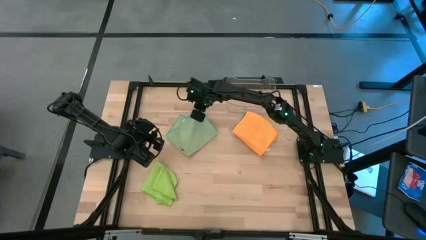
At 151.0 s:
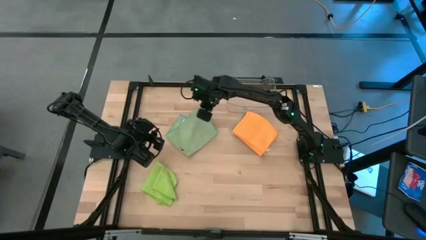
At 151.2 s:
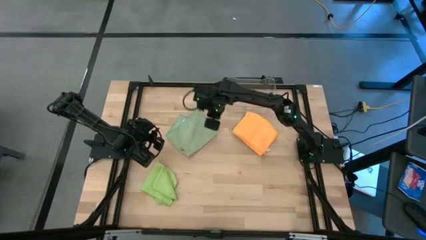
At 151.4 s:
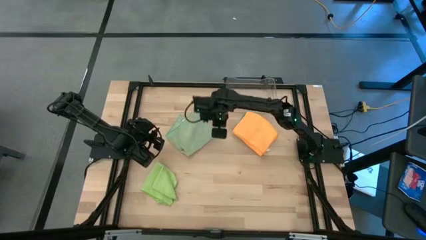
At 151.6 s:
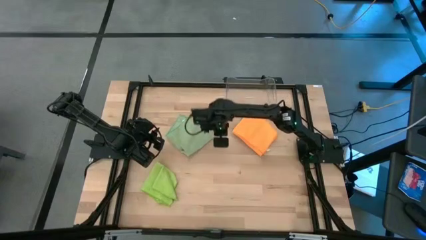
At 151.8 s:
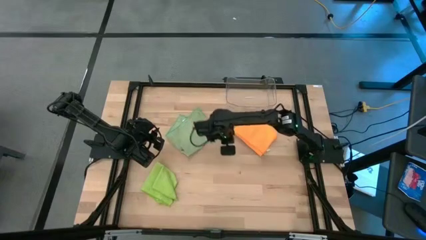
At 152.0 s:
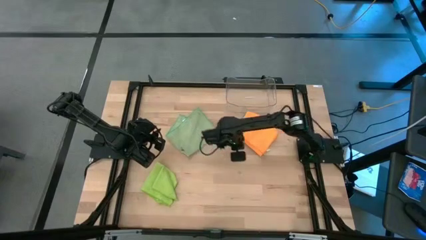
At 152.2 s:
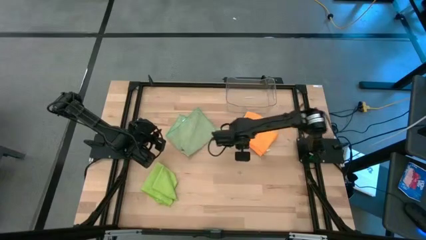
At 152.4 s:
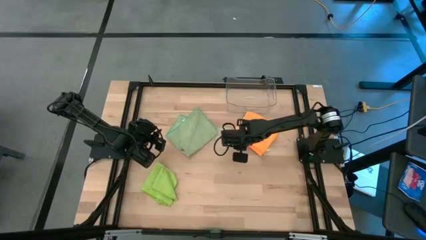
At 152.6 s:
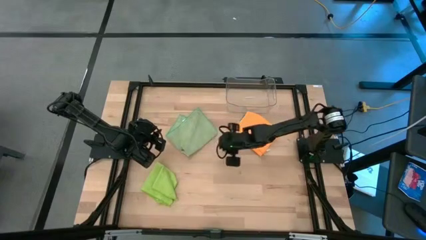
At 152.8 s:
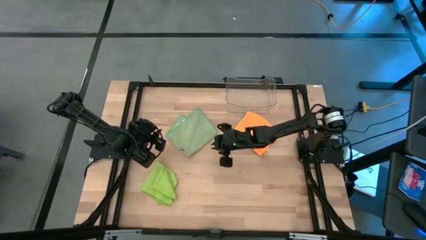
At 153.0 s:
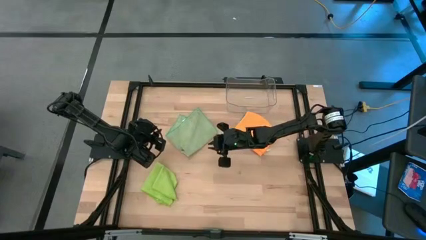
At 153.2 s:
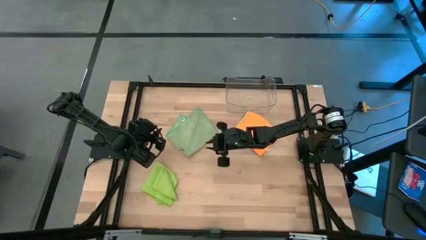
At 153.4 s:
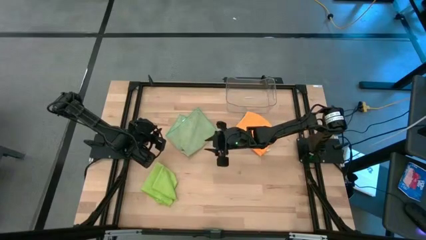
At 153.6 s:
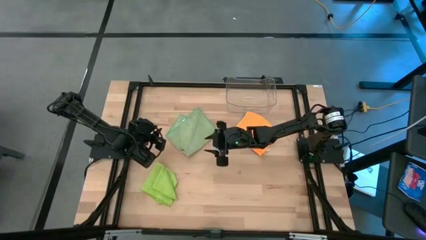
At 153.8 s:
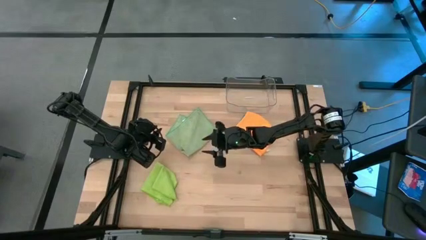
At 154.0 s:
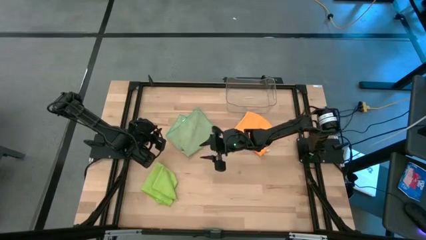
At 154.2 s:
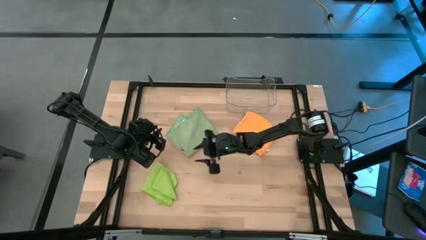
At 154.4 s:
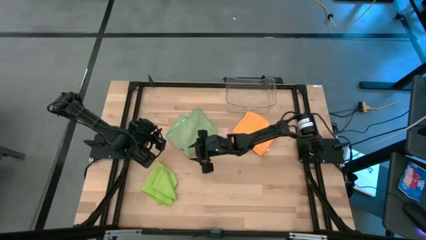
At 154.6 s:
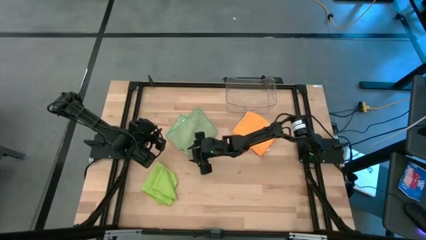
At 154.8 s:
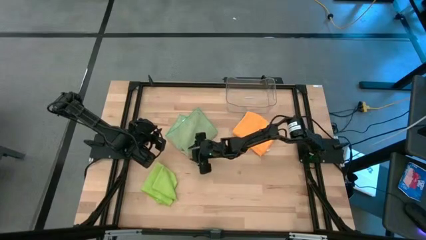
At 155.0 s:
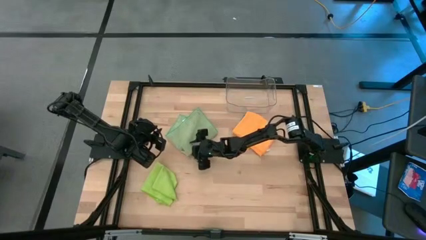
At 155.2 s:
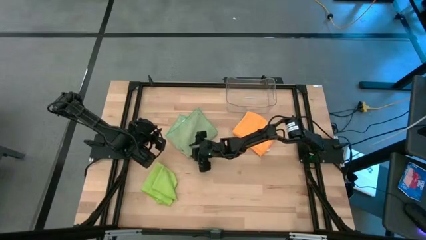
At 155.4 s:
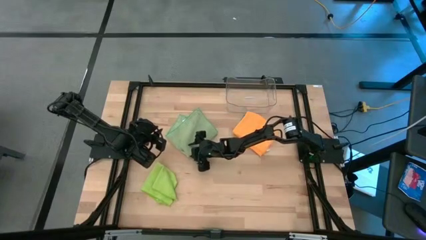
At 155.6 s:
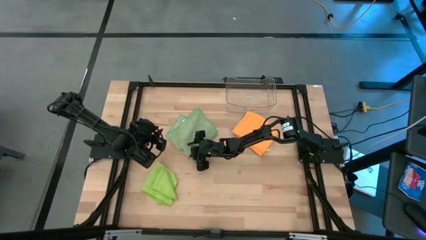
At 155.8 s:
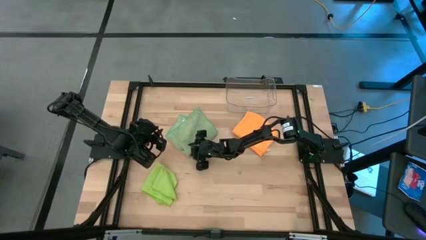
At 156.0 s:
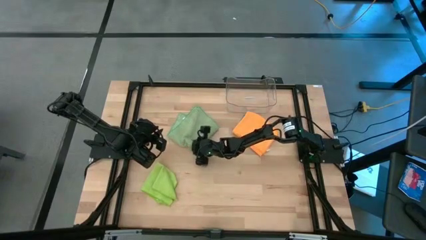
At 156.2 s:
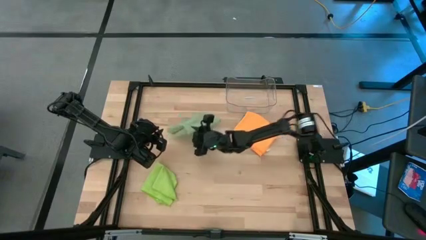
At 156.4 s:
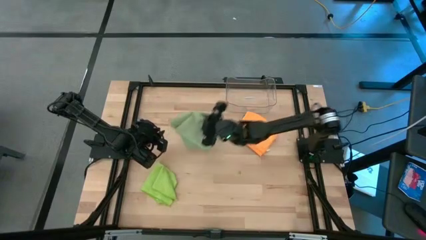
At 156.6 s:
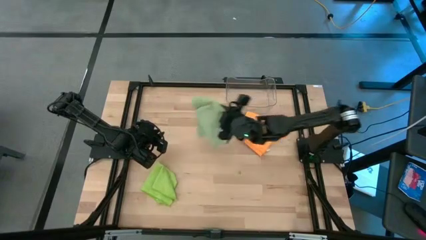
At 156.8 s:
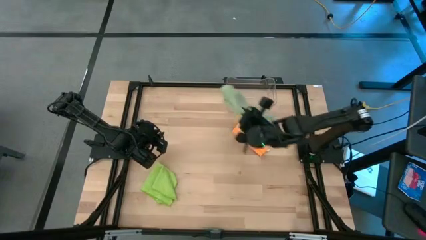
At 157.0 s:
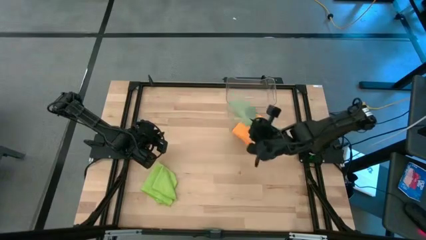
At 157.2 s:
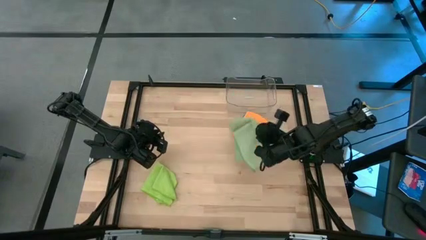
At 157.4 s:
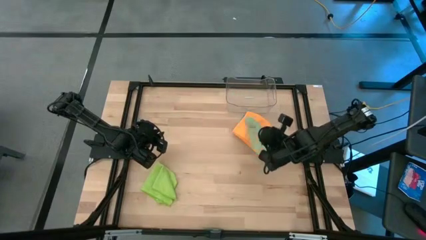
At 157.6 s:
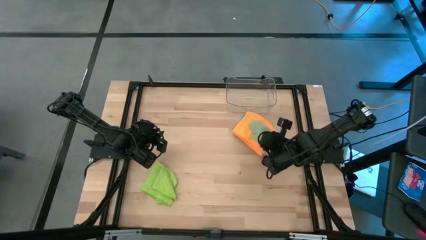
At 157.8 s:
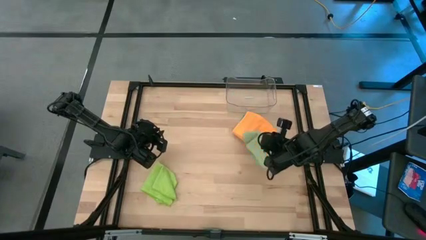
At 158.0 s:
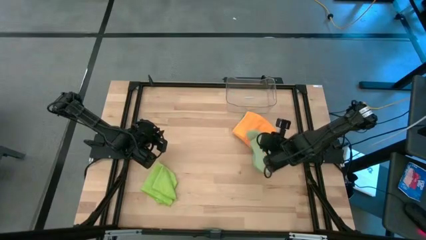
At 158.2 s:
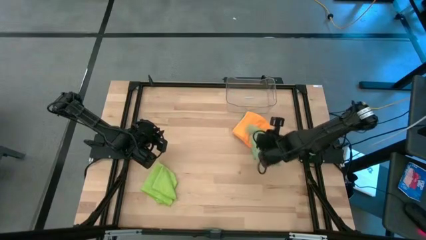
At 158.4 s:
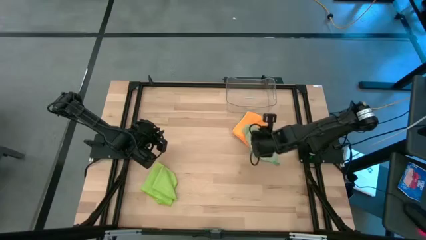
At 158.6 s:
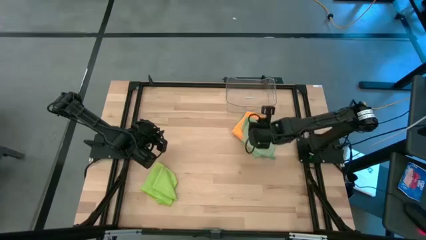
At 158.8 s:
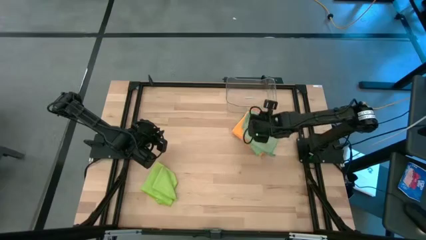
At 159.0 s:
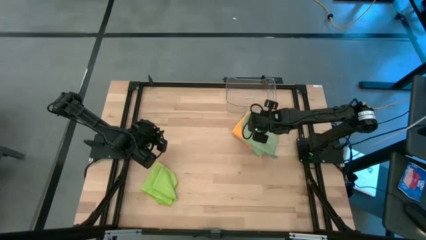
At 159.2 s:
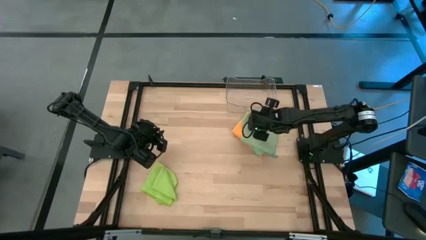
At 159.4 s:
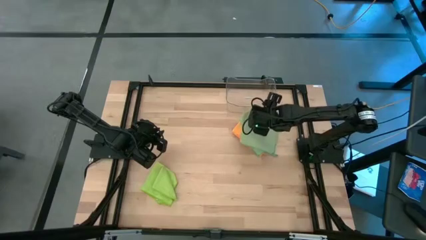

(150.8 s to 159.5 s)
Task: Fold microfiber towels
Stack the folded green microfiber cloth on top of the folded orange microfiber cloth

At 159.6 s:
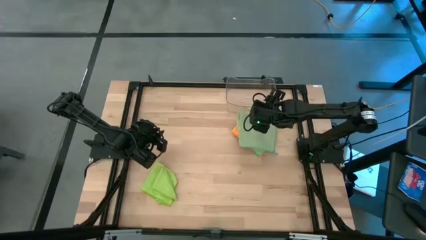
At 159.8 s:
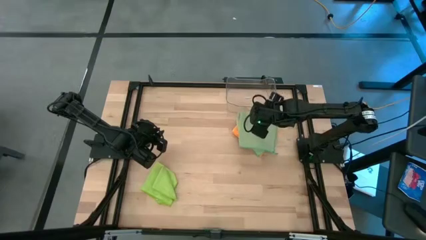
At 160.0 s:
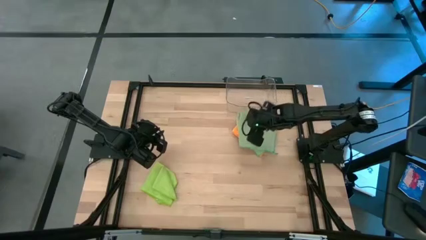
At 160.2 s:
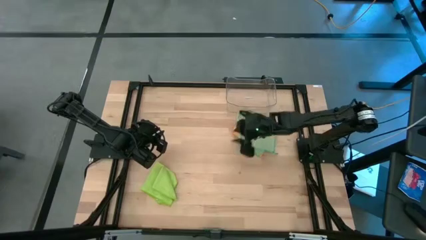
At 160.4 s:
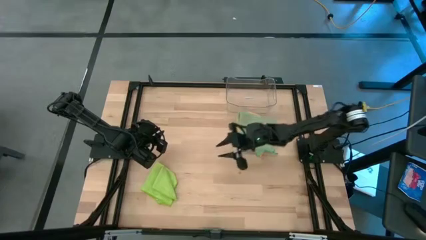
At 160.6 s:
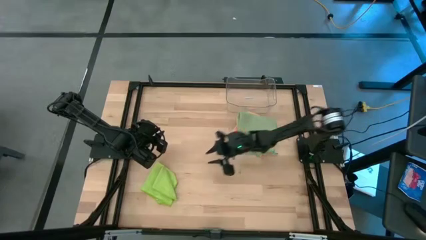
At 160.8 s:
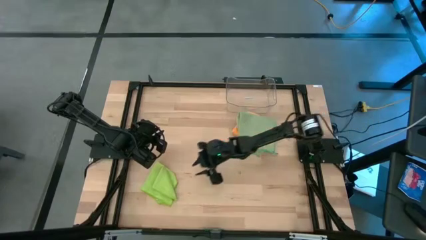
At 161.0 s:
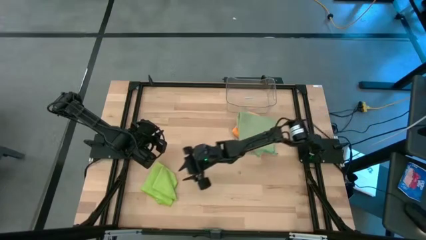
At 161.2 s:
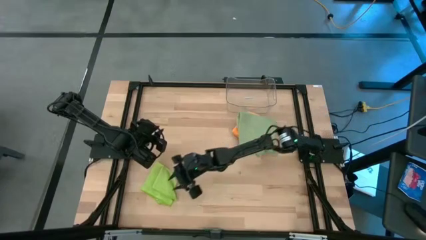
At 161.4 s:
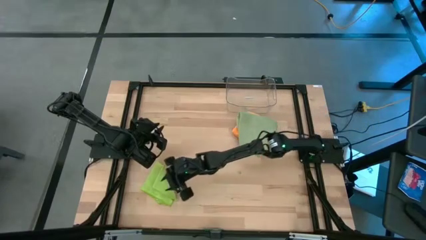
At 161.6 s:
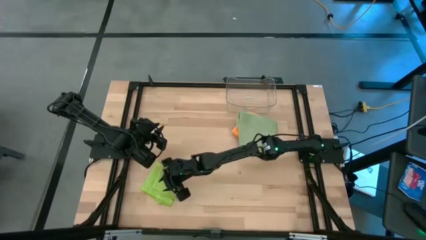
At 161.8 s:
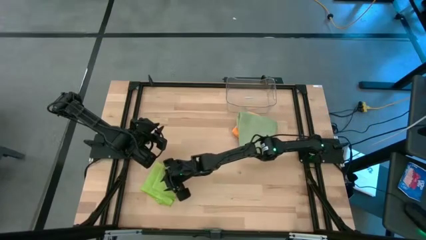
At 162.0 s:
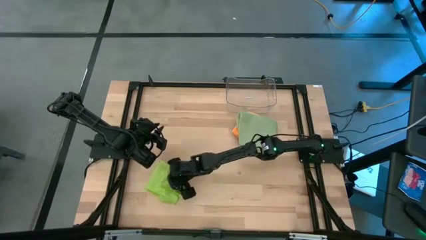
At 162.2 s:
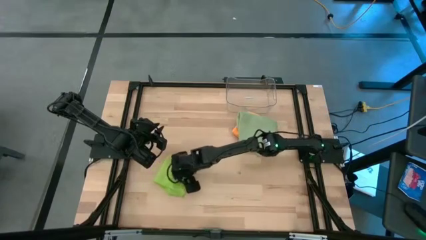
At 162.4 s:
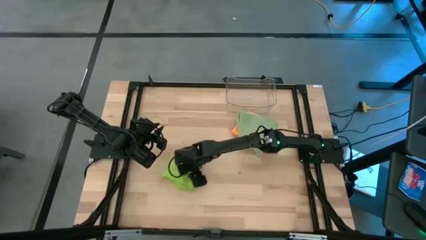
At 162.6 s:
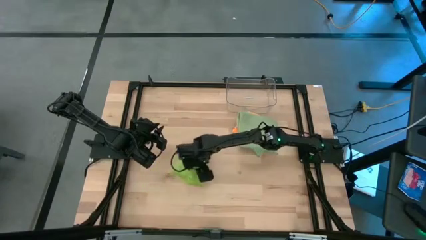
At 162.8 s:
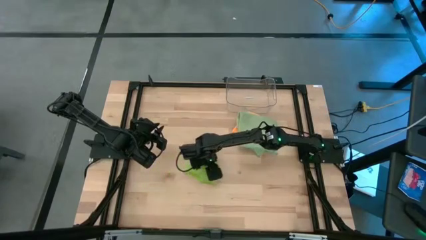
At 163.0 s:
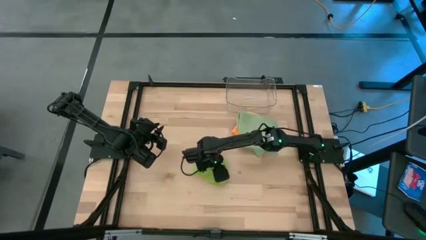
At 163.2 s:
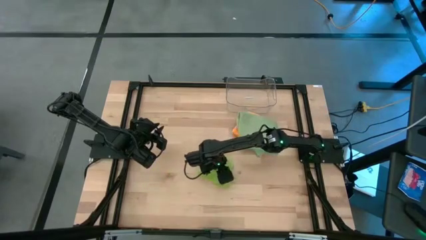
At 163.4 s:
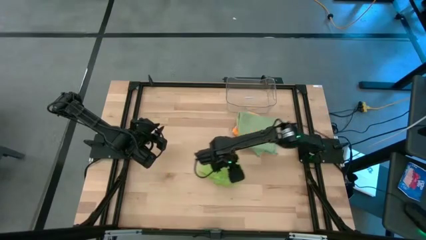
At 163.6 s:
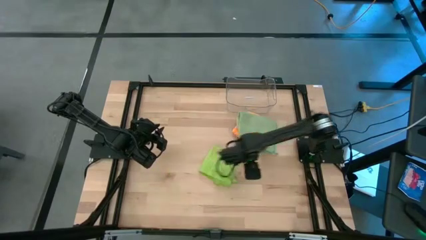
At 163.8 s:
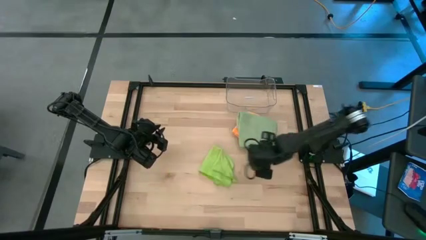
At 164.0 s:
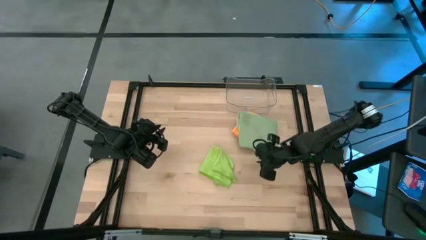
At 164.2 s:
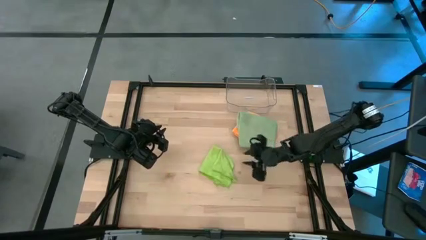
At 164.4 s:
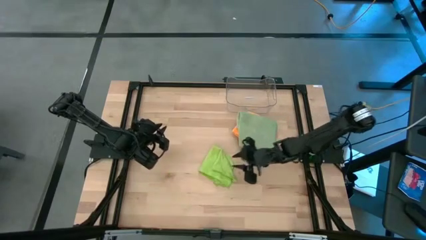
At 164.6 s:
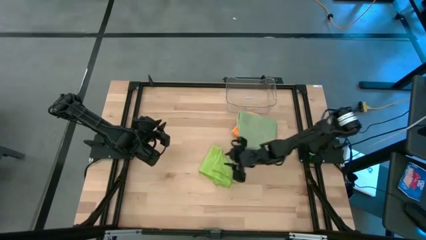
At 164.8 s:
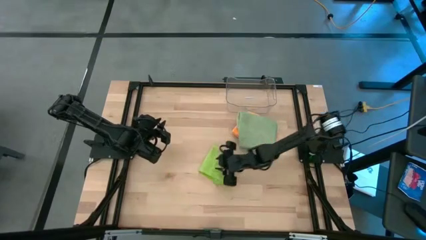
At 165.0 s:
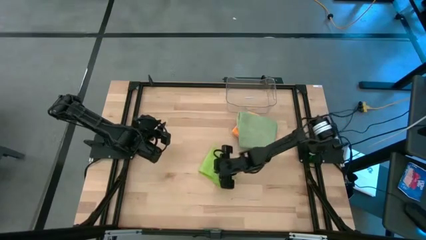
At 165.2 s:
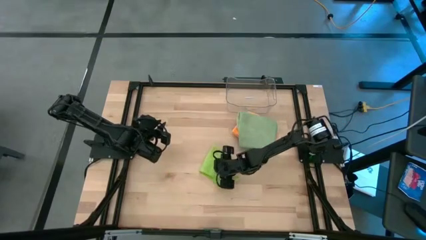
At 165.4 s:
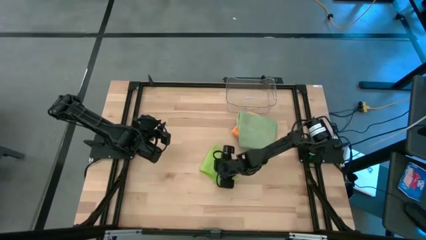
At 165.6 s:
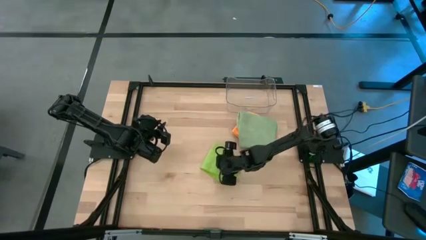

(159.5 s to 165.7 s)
Move the light green microfiber cloth to the center of the table
